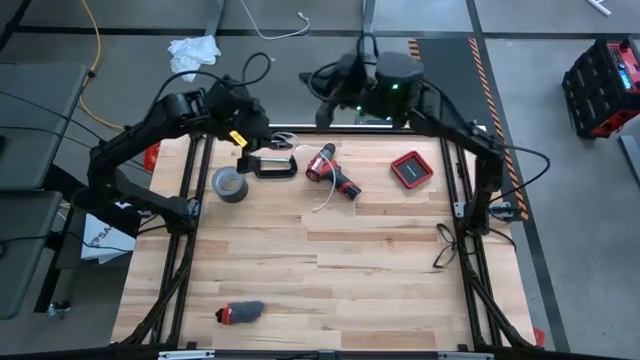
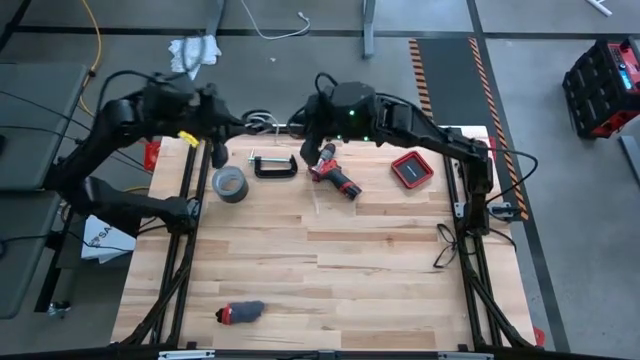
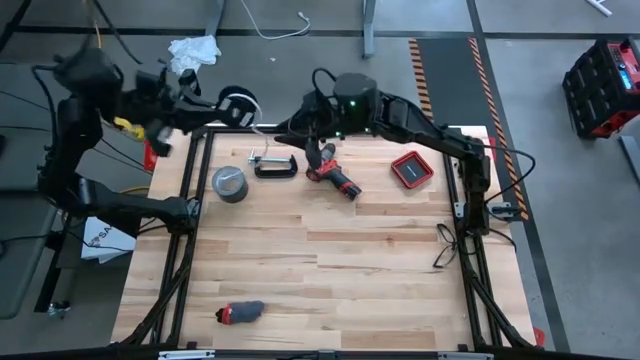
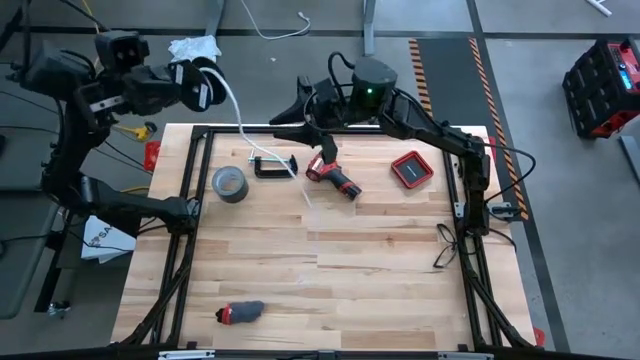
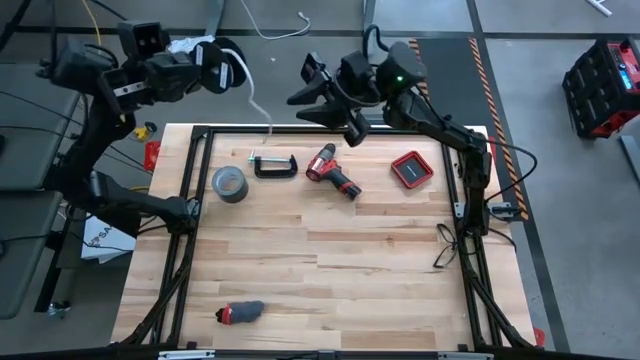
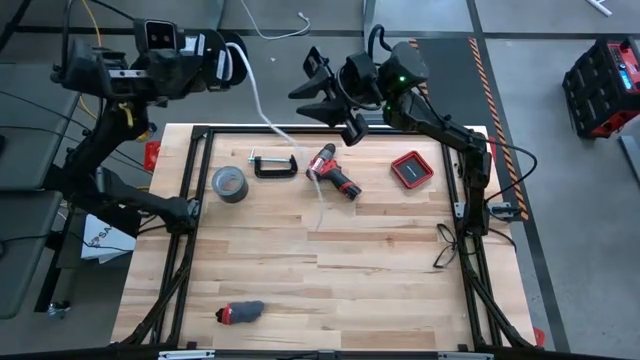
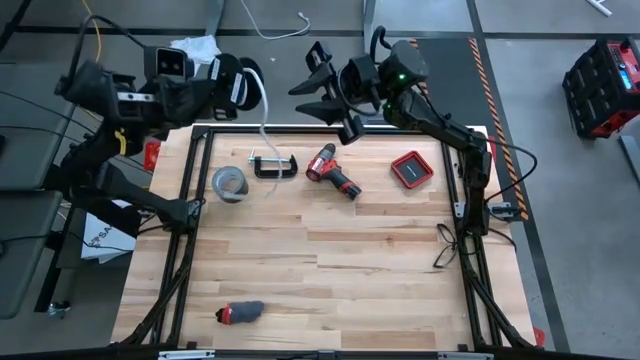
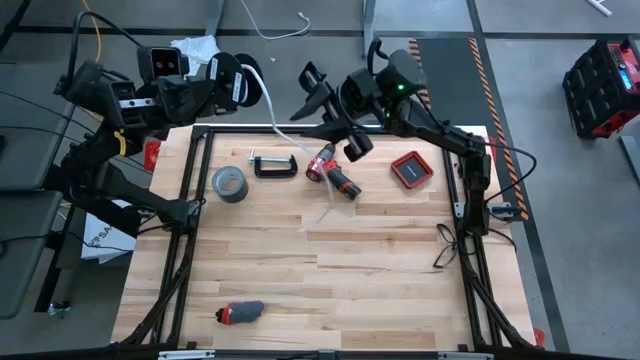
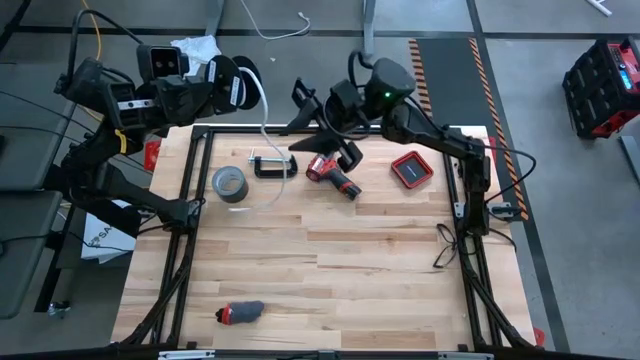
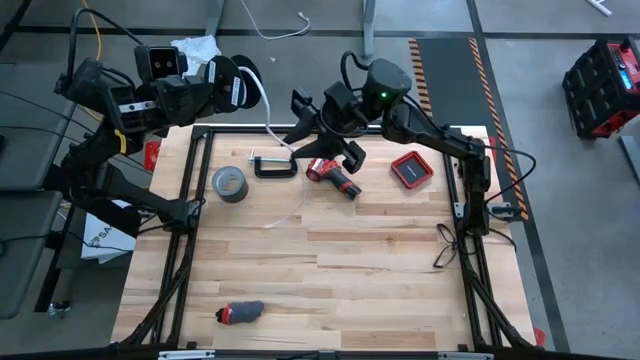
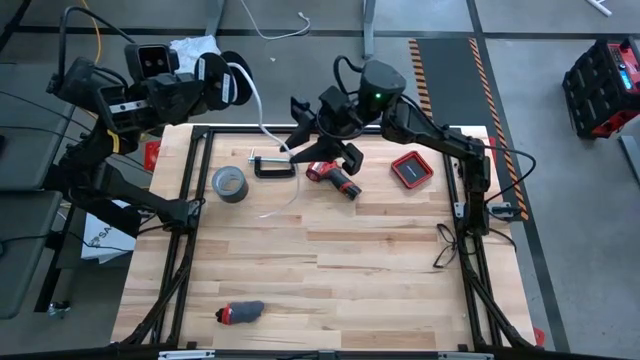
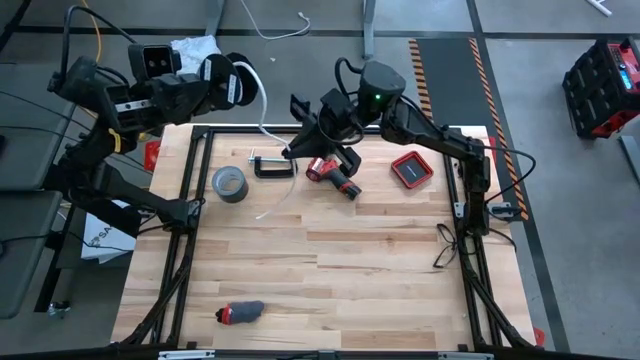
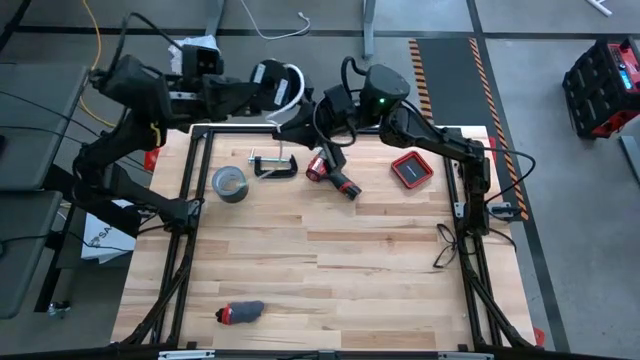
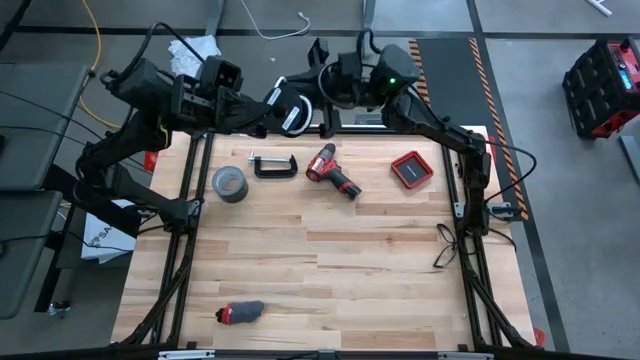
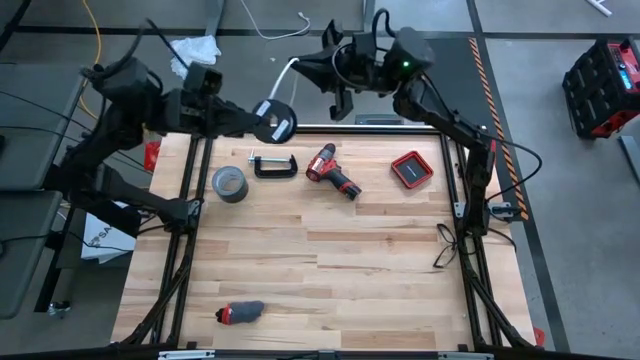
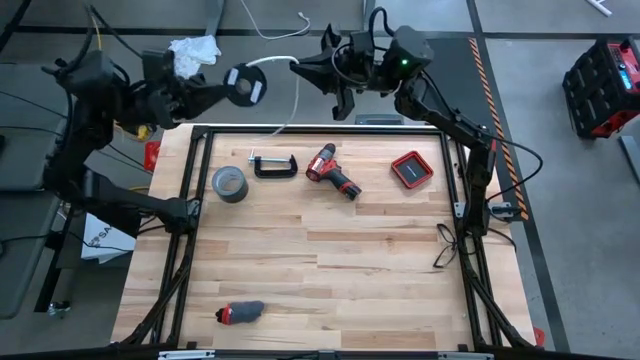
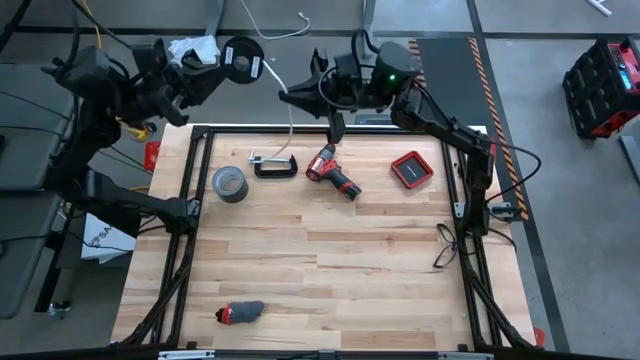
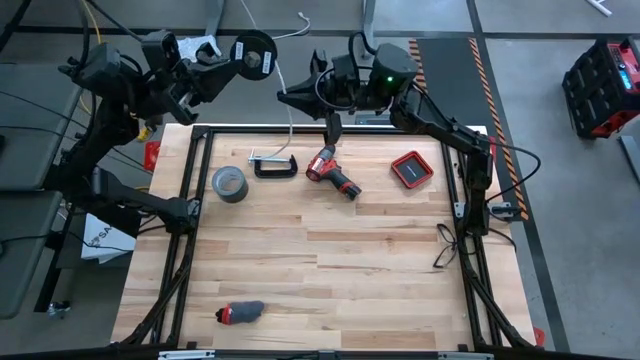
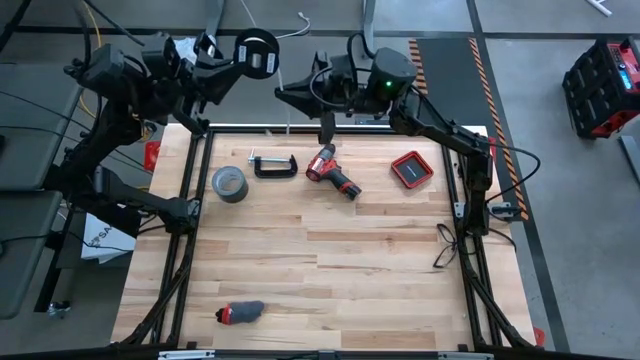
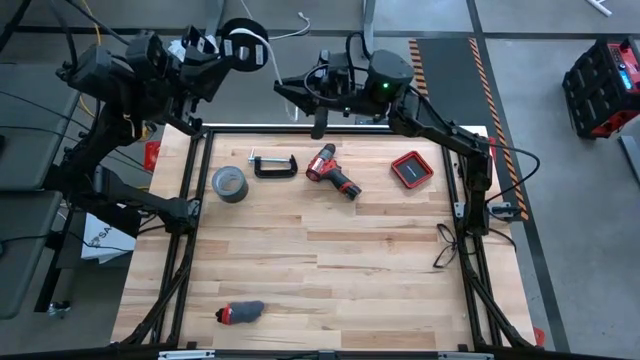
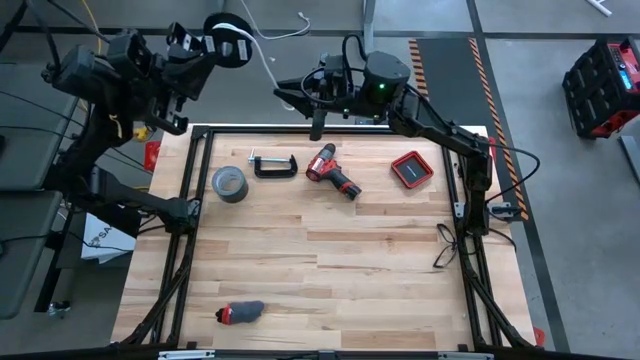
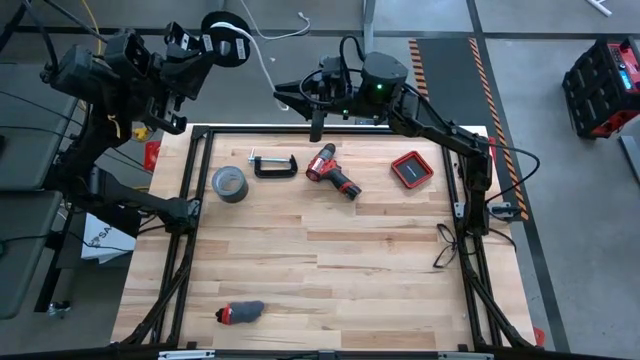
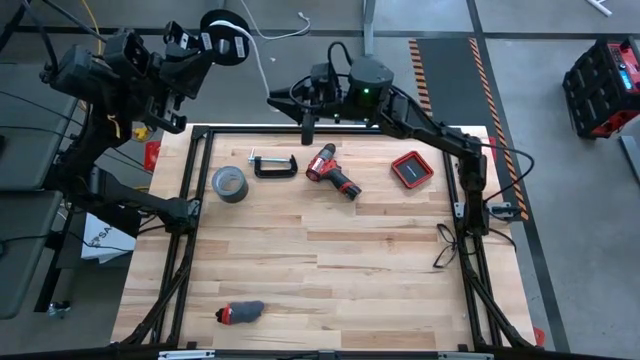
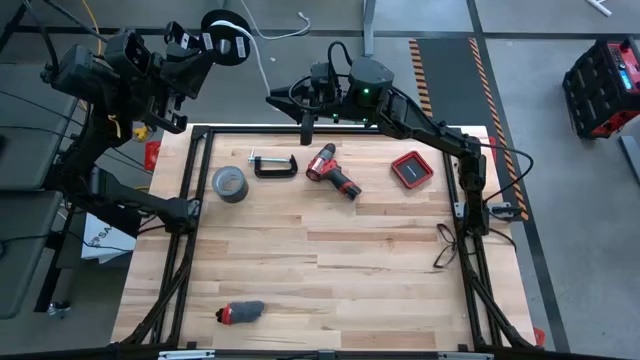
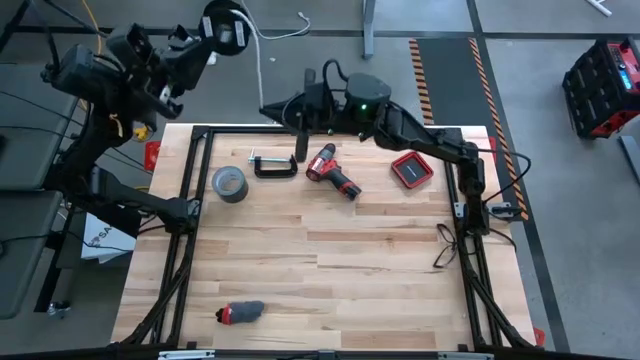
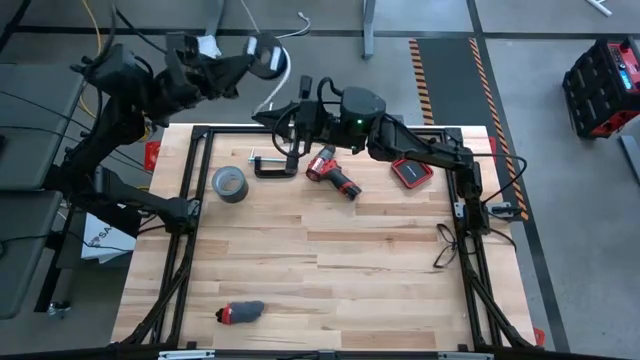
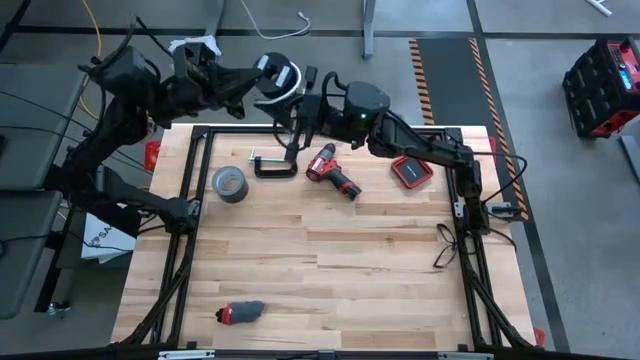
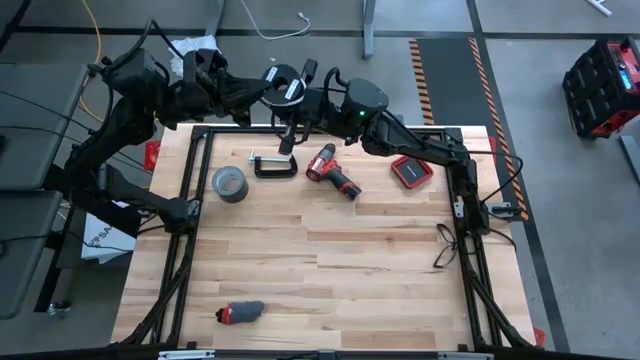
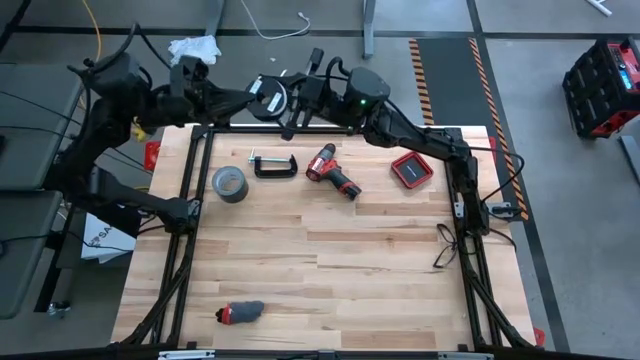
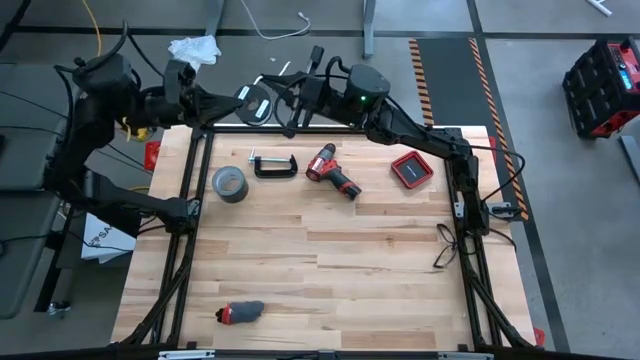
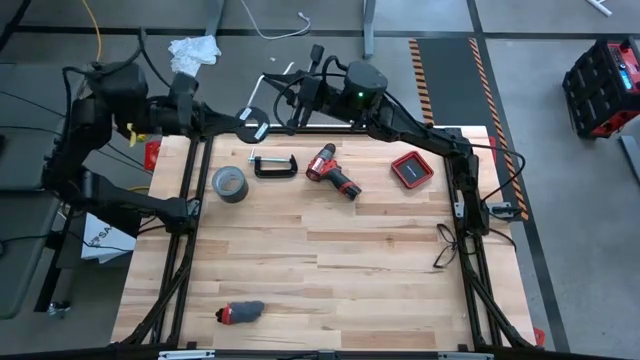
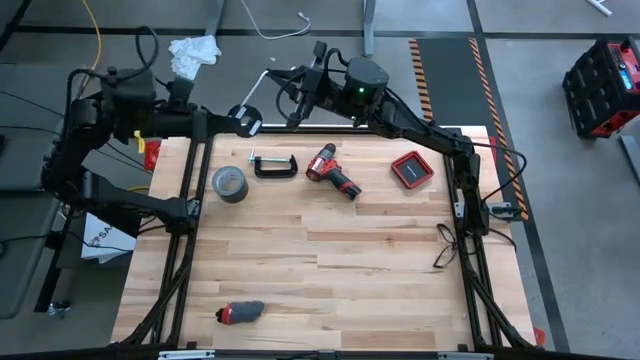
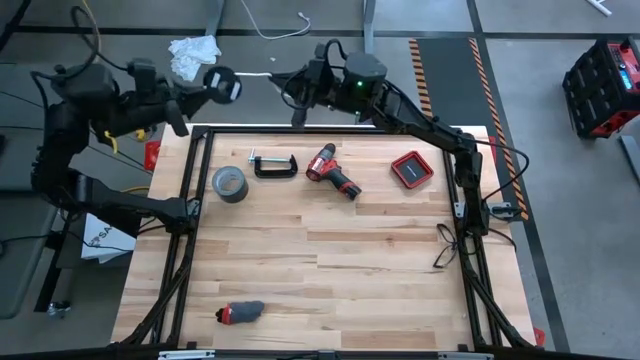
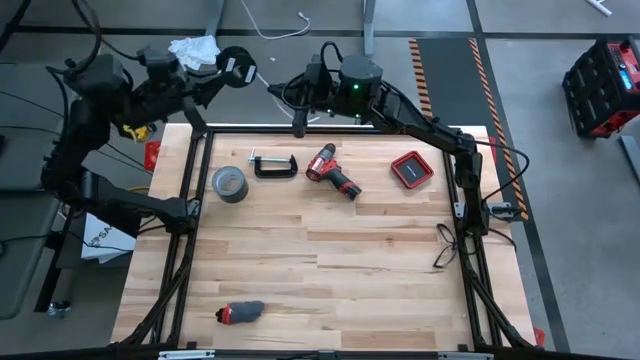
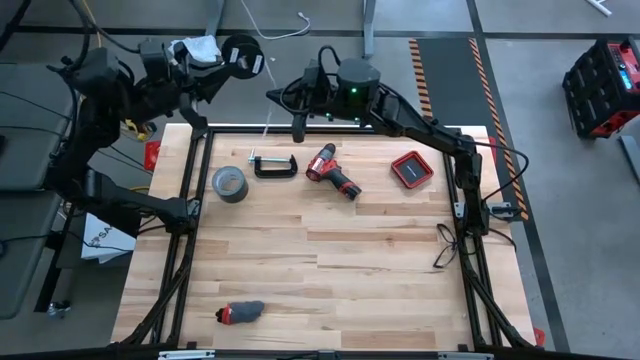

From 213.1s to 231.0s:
Task: Coil cords
Coil the white cable wire into the black spool

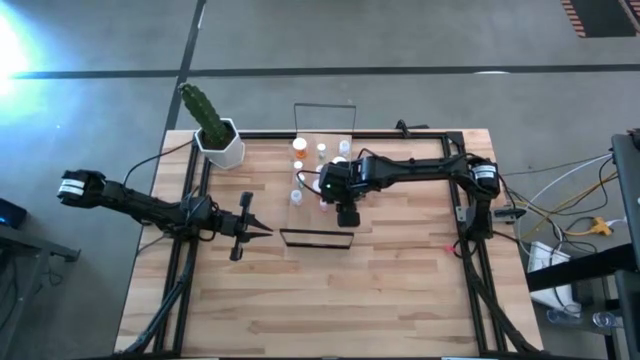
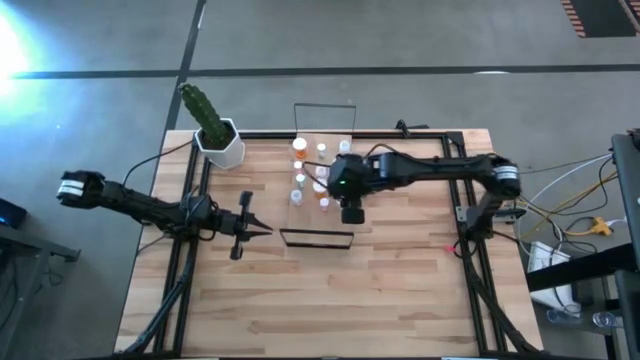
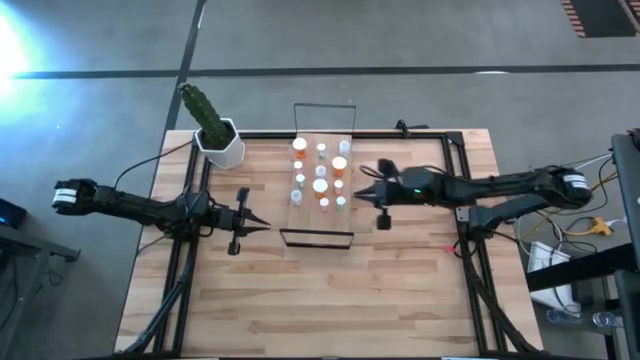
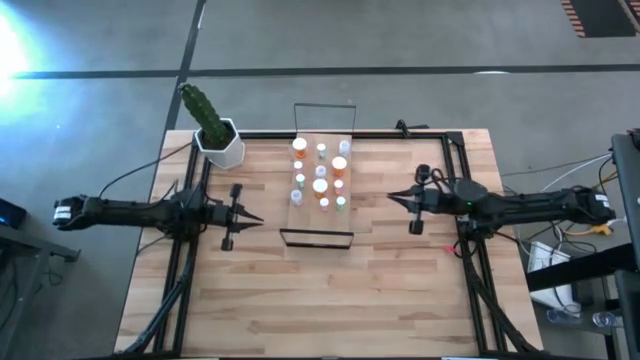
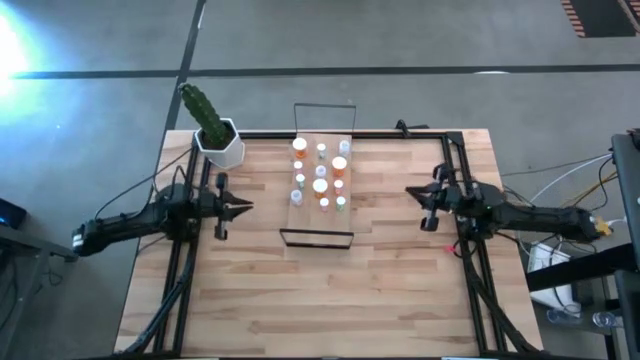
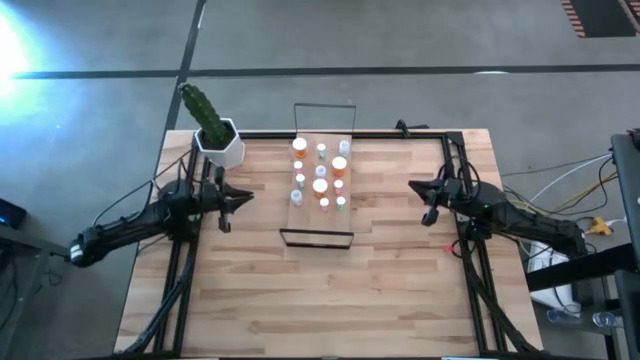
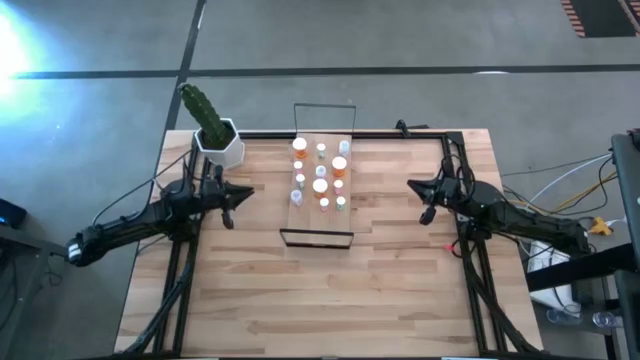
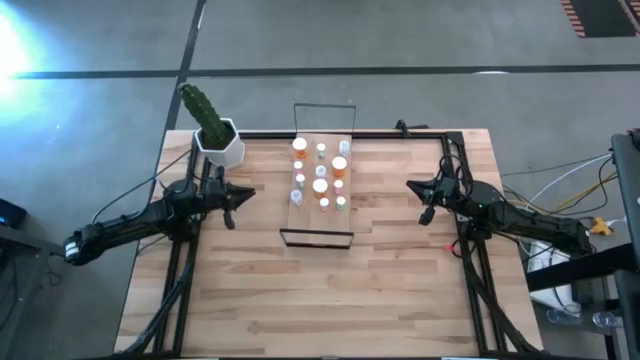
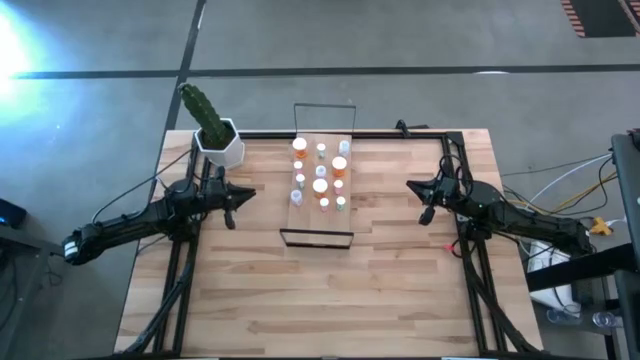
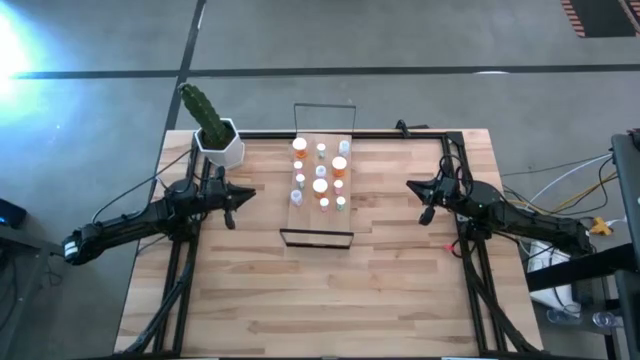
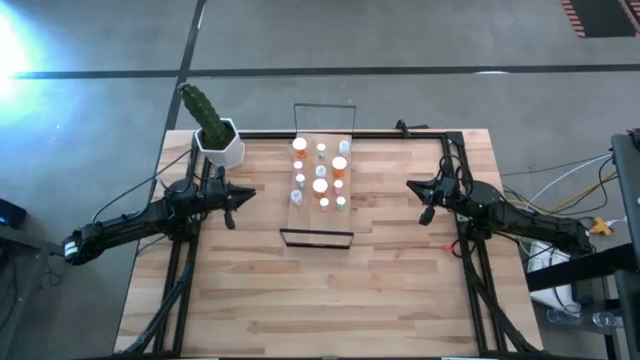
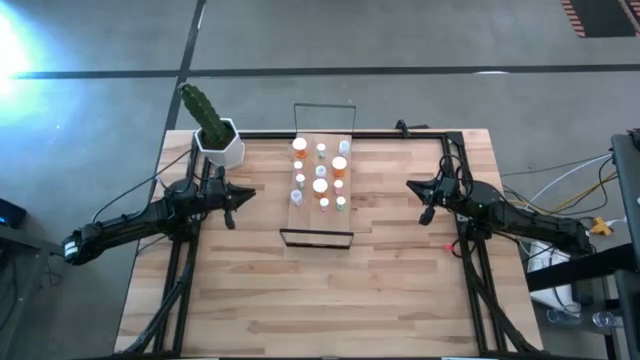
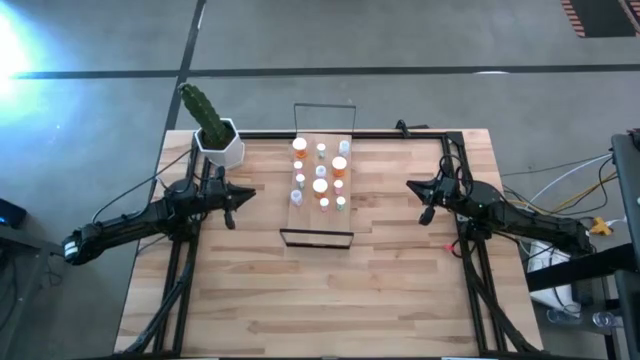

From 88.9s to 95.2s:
Task: Pick and place medicine bottles onto shelf by color
Return to home position
